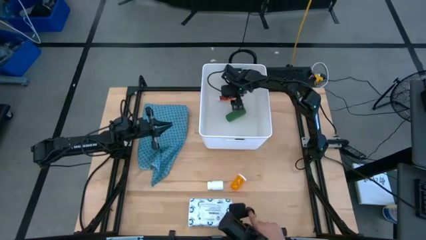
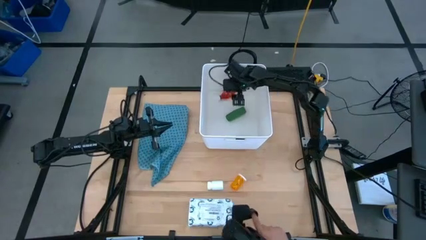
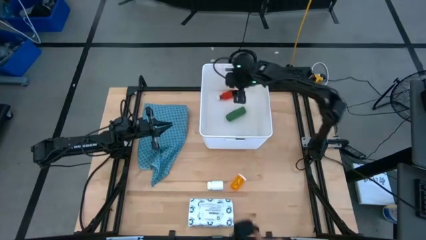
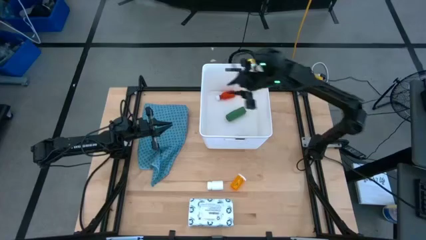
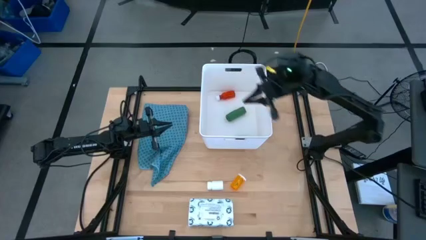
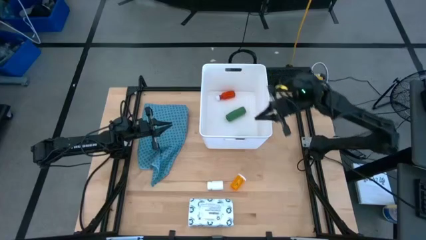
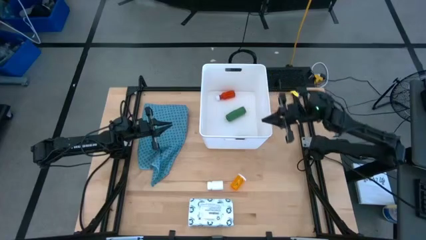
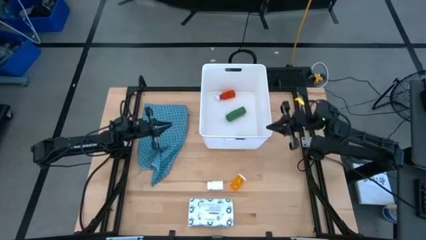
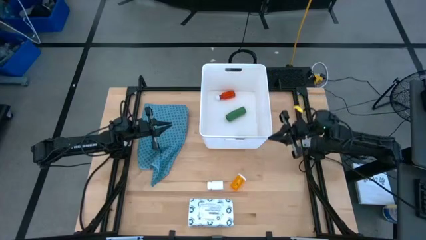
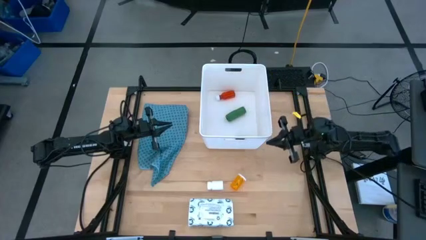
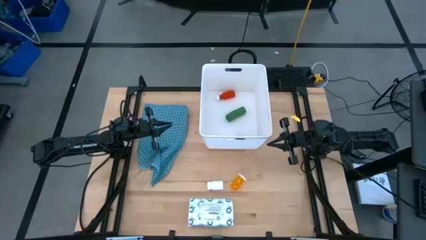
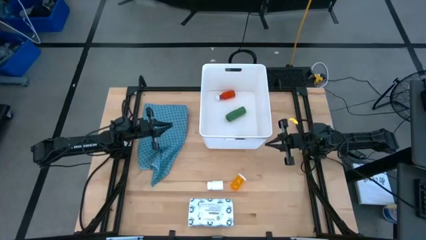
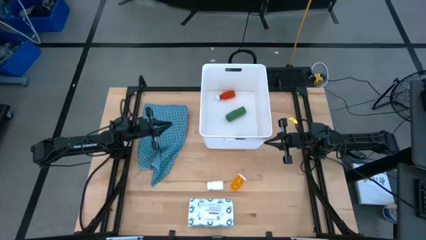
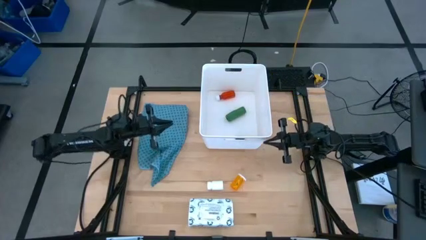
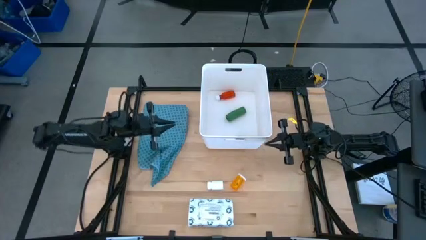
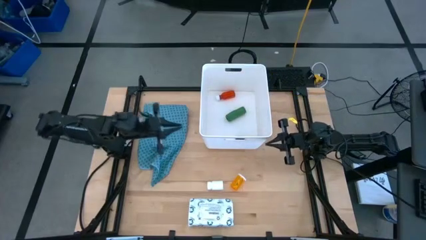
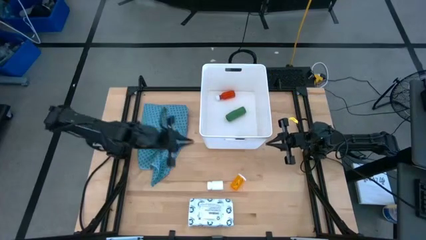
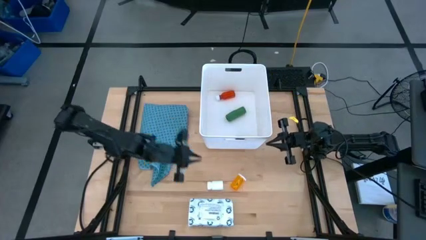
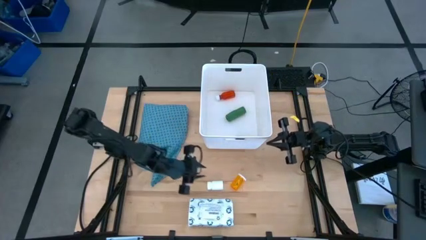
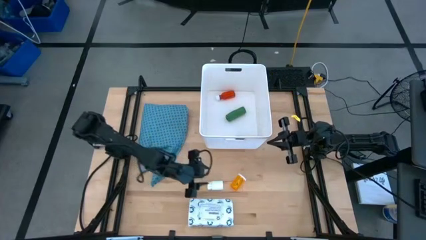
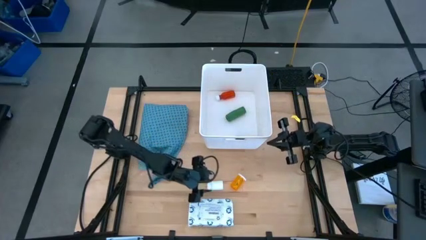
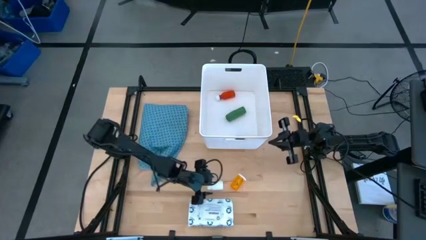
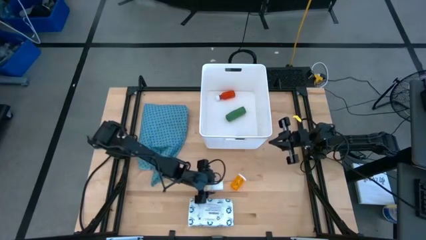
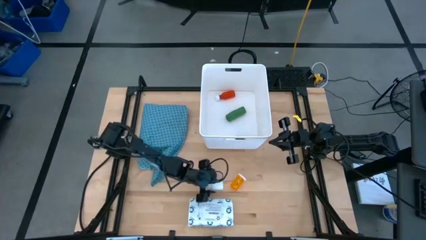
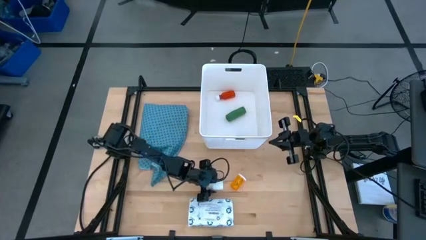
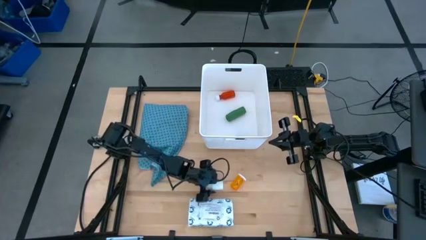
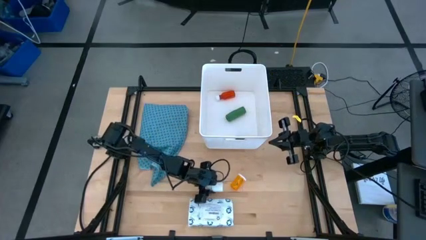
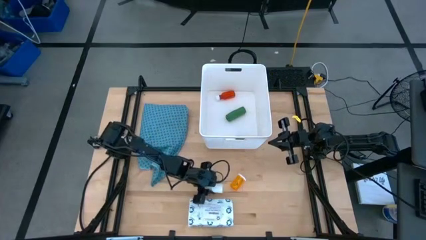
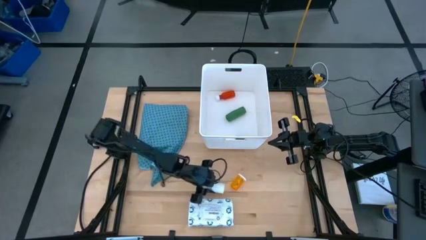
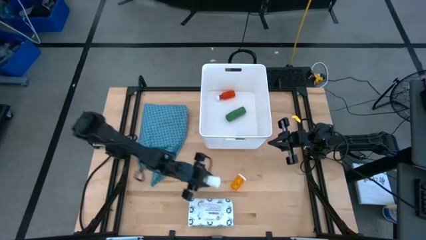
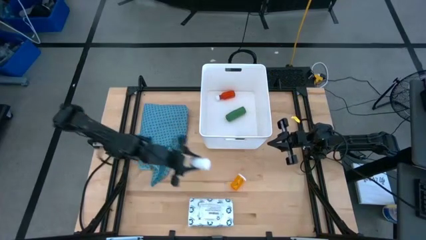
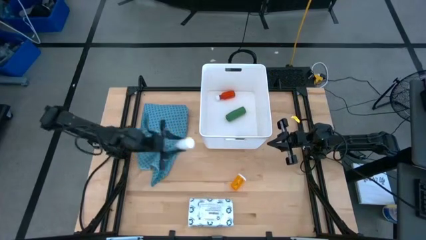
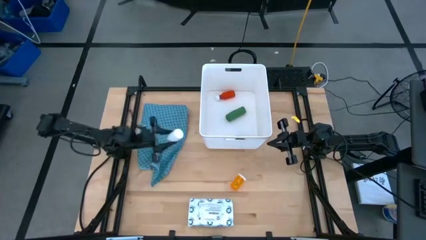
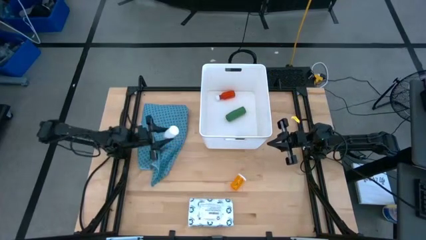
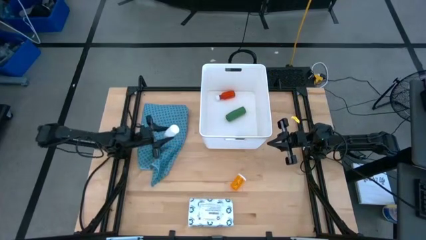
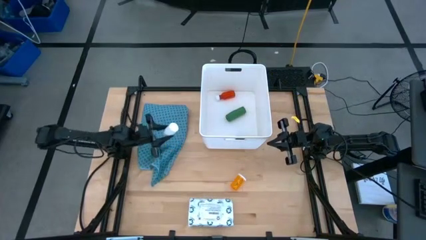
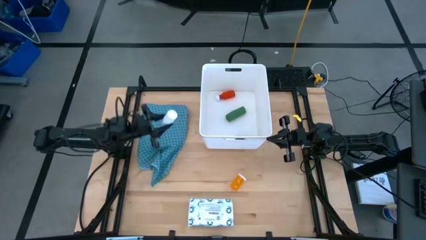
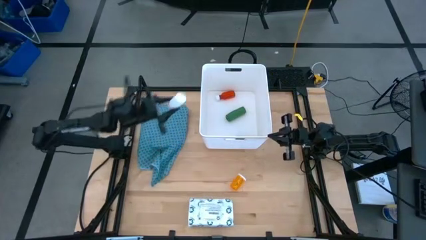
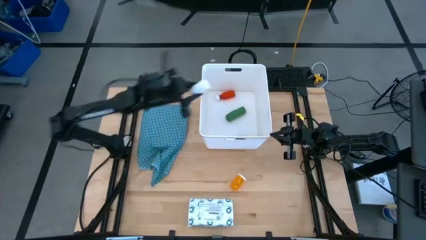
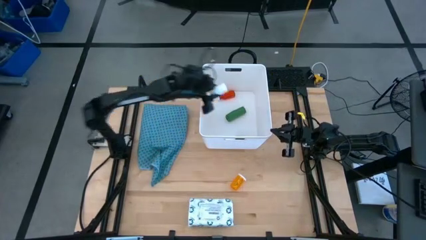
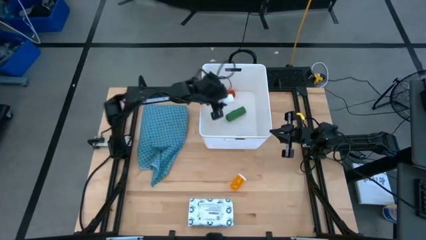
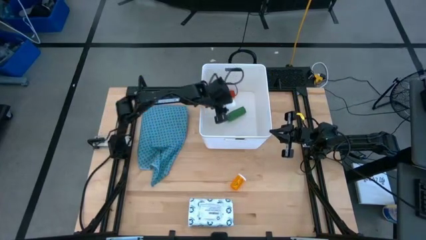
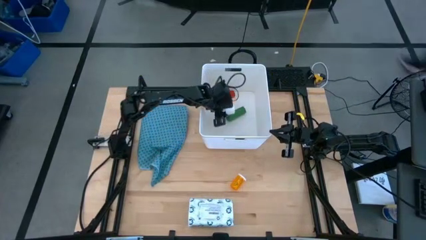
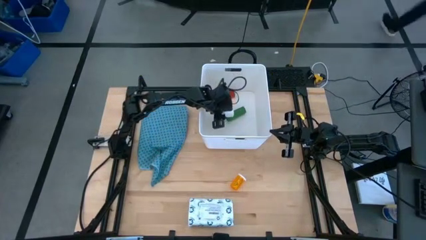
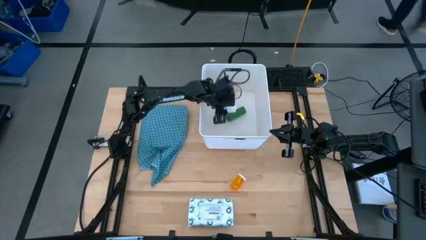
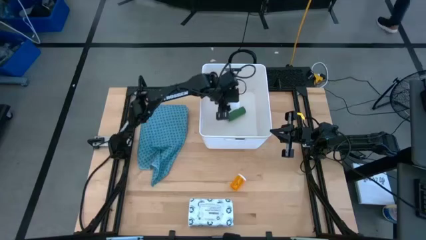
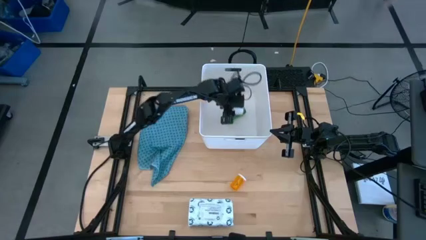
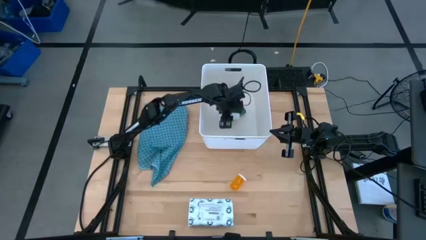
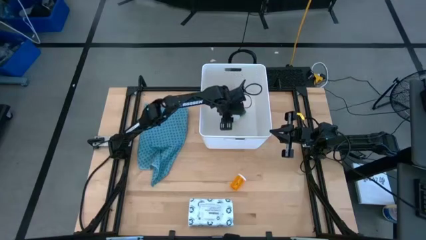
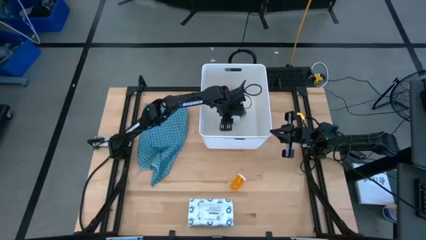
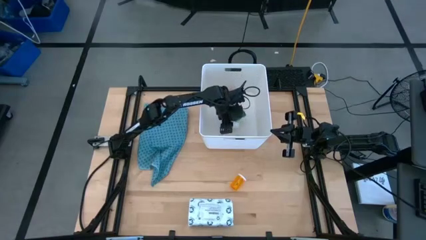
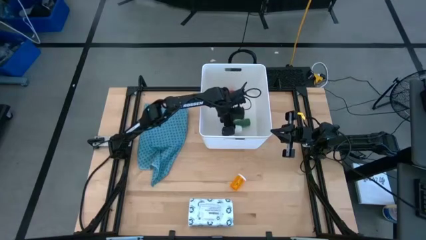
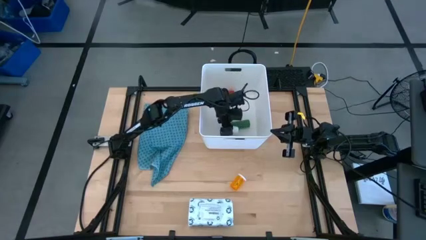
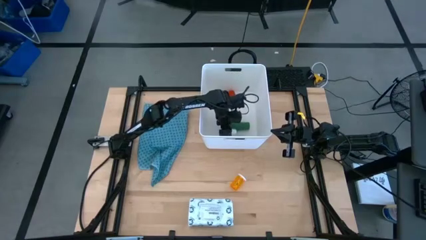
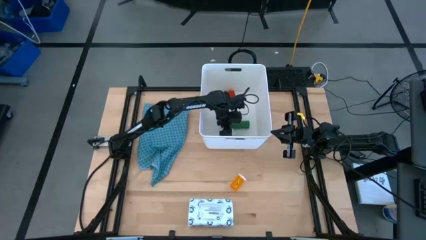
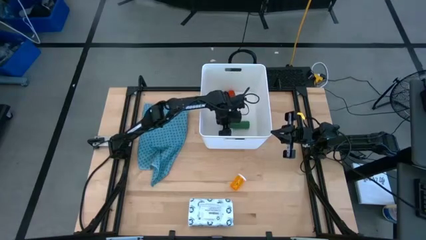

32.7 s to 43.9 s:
Task: Pick & place medical supplies in basket/bin
Put the white pill bottle into the white bin
